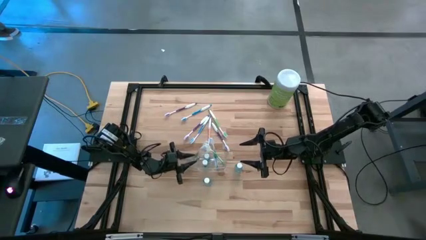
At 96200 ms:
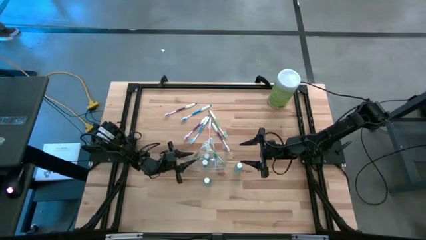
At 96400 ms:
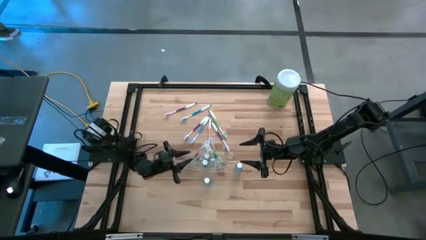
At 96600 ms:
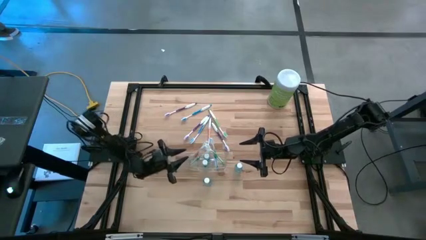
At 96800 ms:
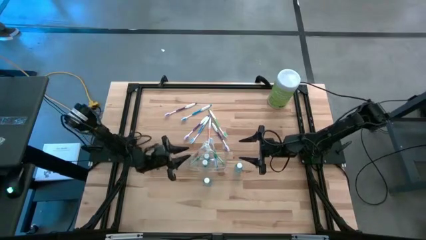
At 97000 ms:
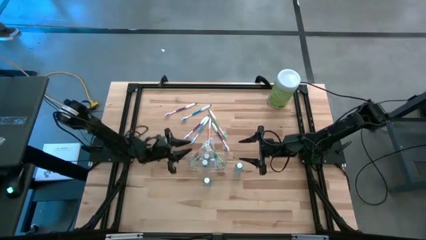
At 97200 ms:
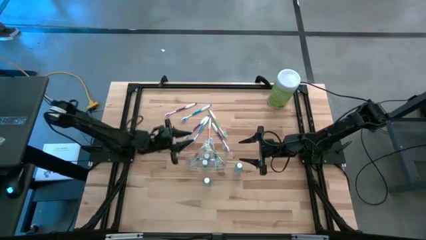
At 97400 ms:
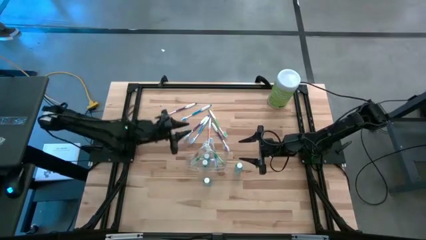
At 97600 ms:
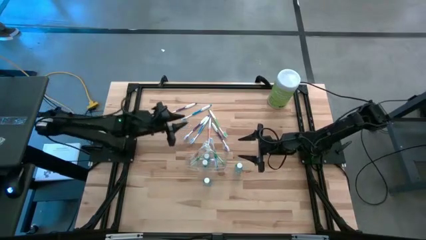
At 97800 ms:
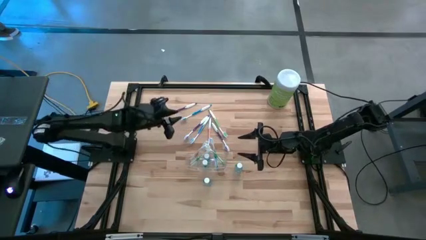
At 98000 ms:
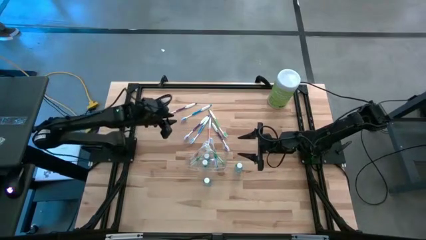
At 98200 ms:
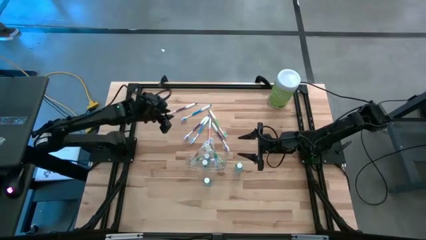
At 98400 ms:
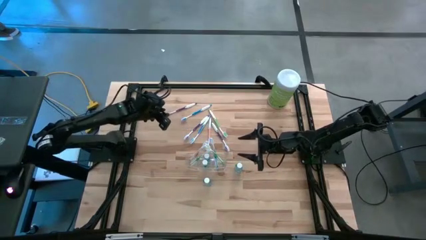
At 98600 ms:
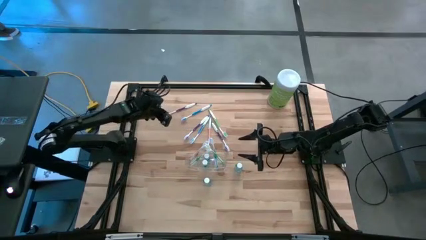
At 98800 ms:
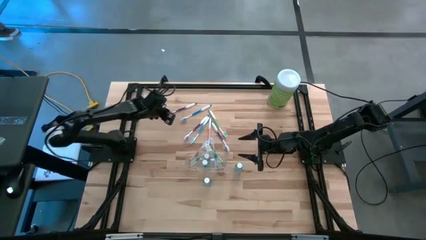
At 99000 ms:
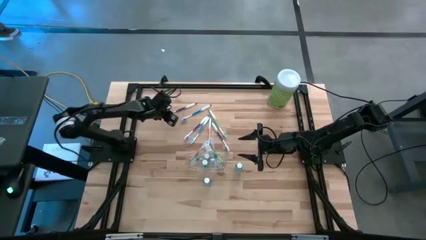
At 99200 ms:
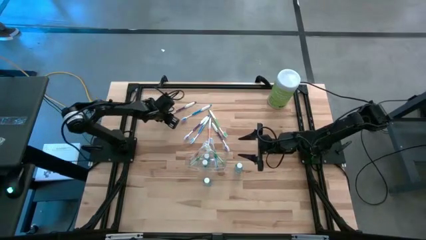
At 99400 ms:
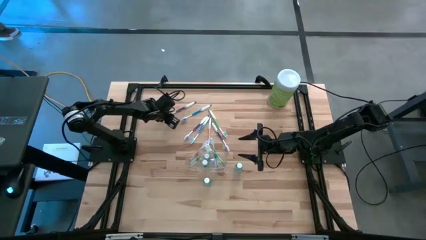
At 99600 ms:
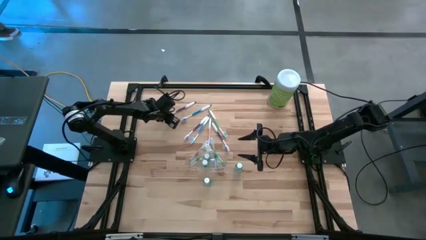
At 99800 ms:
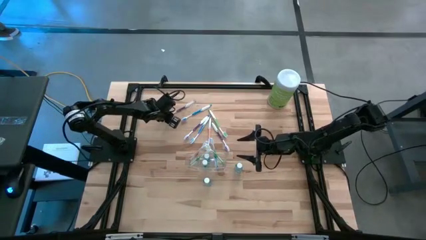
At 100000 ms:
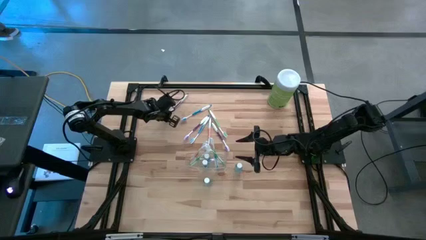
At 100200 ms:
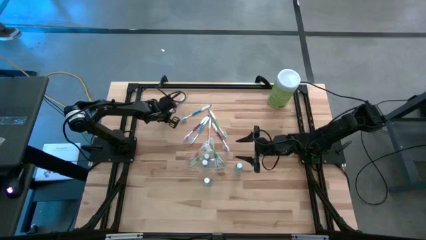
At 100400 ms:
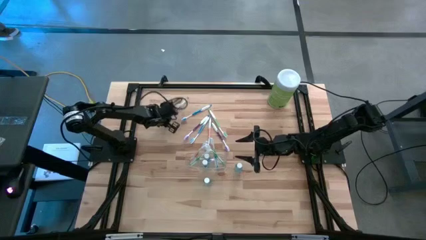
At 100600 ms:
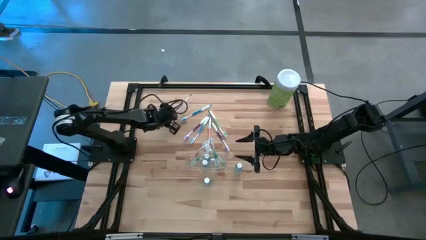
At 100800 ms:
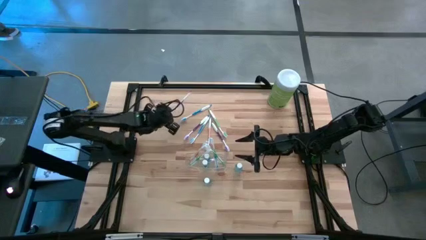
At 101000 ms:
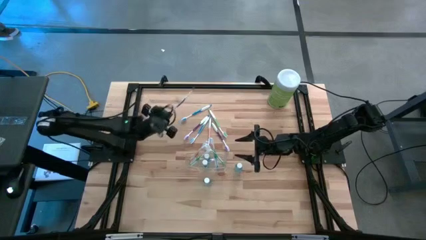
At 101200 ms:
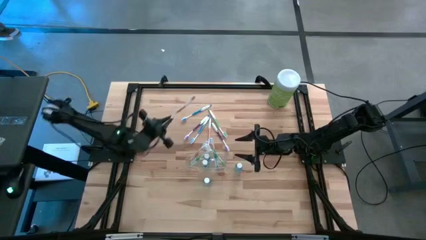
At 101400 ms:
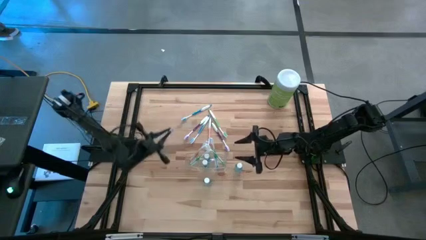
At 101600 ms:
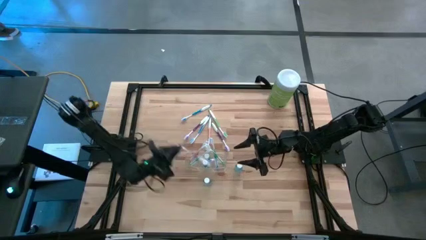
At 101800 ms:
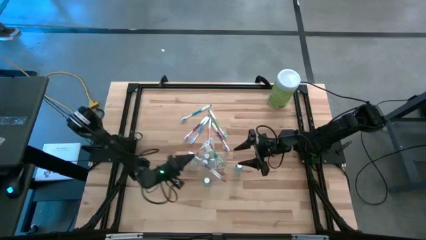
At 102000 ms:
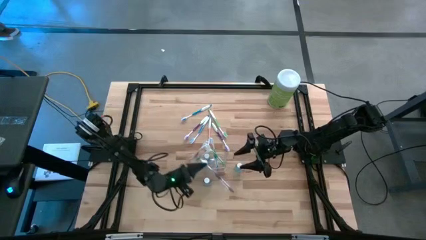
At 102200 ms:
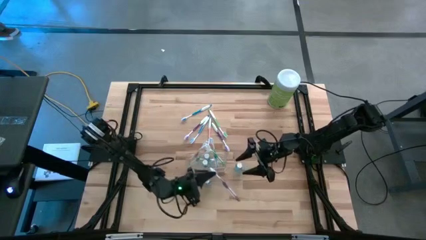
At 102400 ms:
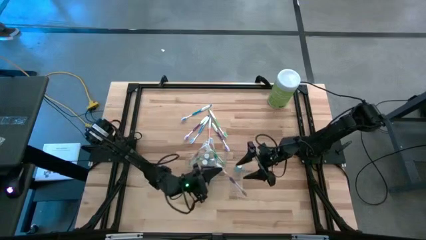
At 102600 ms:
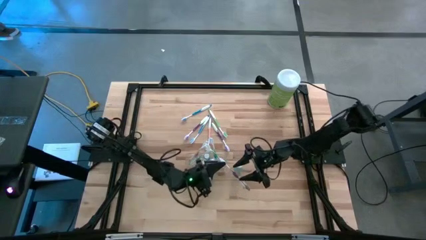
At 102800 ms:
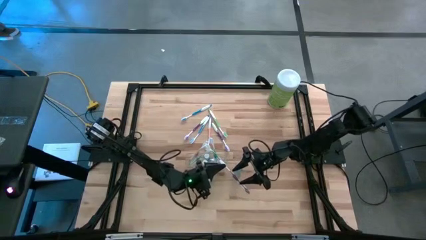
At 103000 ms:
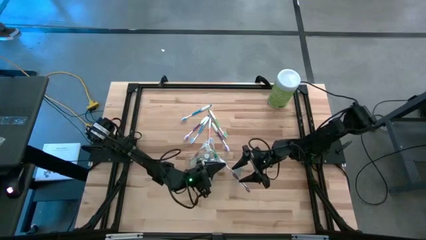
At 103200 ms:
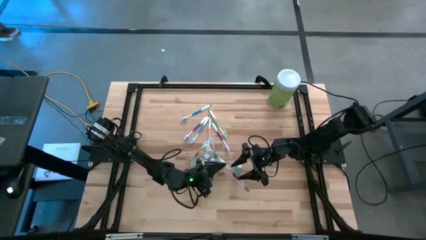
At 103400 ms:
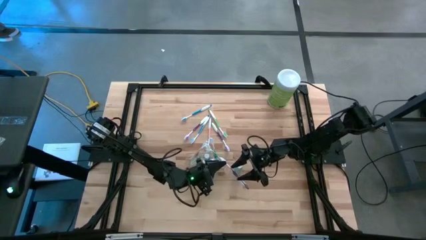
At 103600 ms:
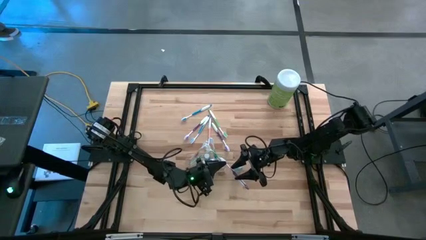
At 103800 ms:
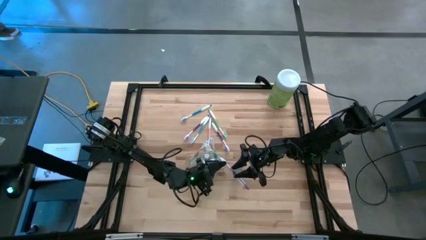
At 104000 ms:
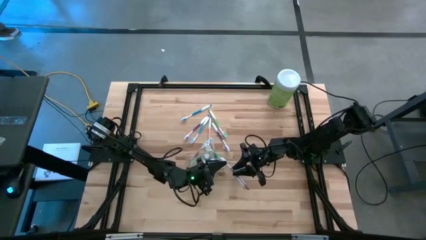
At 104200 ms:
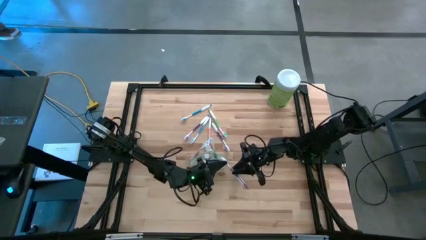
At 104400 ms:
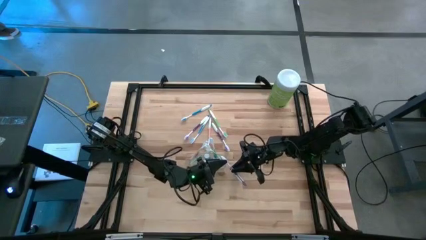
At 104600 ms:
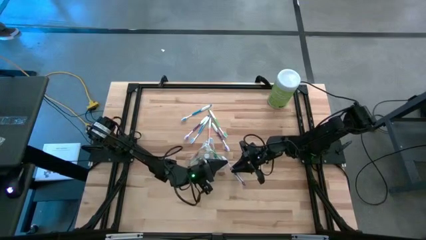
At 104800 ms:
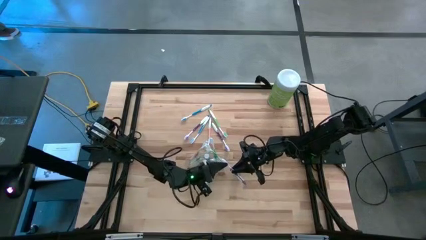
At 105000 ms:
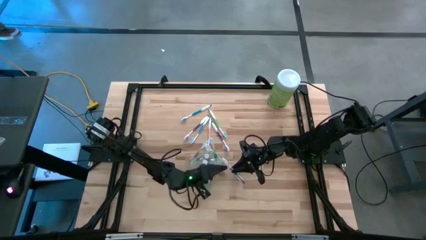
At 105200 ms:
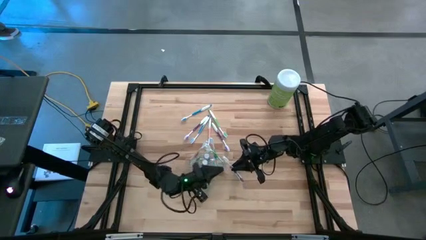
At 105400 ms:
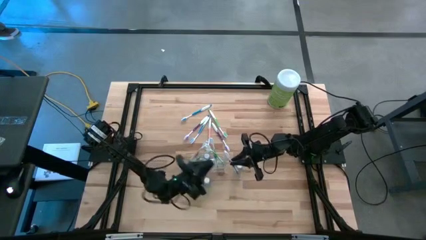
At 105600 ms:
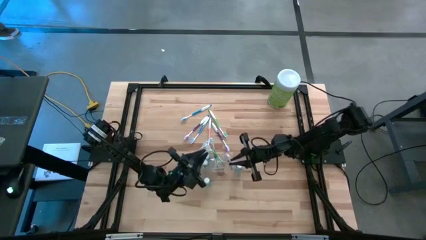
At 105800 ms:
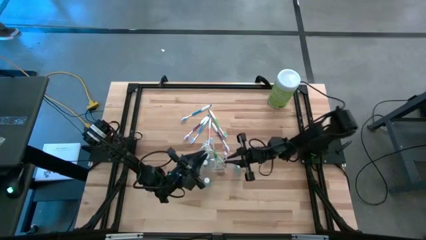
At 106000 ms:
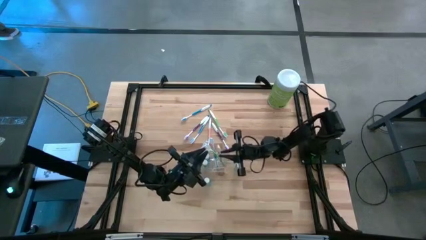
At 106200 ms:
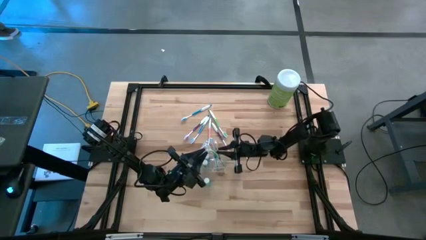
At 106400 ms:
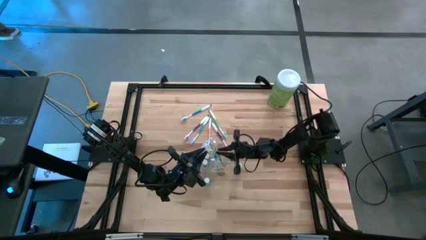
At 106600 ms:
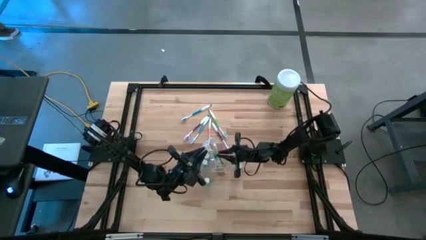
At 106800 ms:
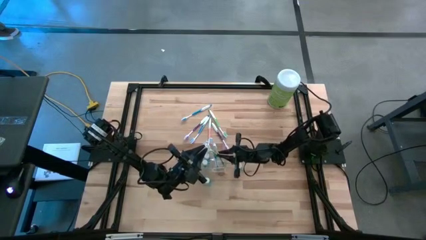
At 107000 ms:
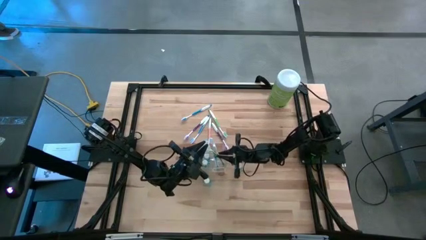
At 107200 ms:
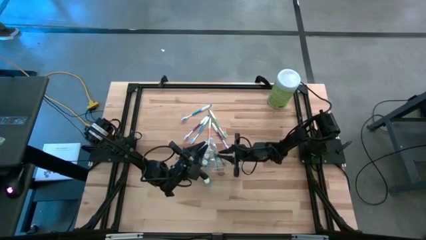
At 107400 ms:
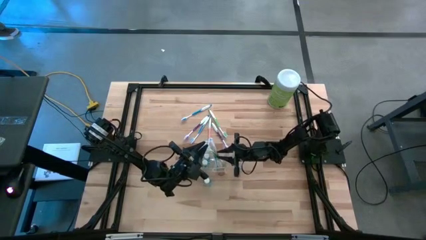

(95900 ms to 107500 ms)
Task: Pick & Place toothbrushing station
Put the violet toothbrush into the transparent organizer

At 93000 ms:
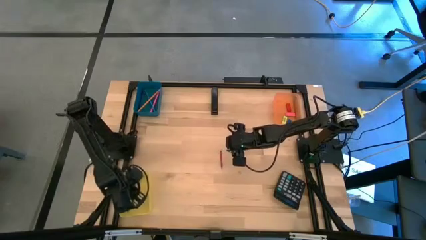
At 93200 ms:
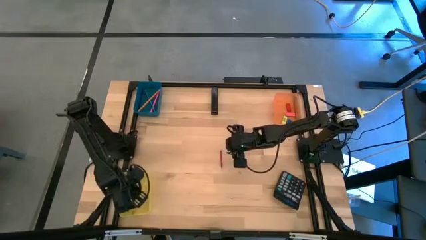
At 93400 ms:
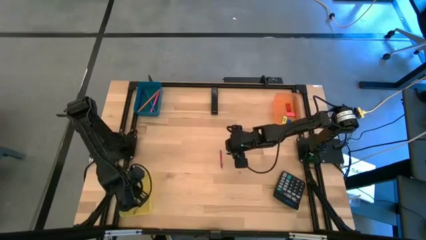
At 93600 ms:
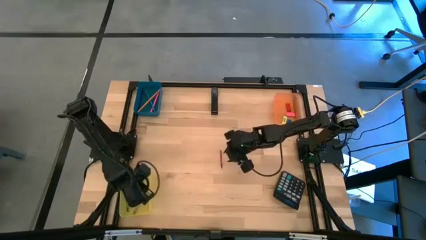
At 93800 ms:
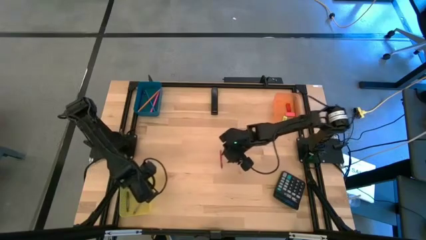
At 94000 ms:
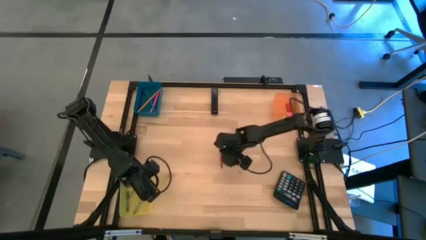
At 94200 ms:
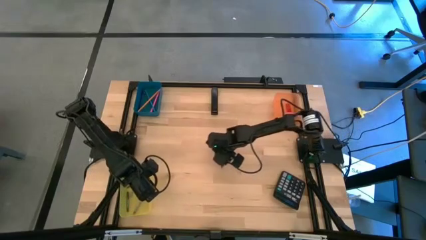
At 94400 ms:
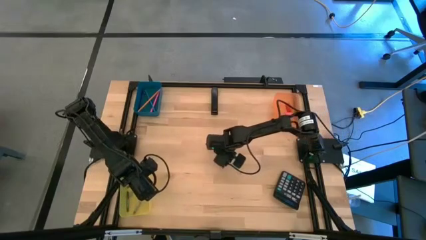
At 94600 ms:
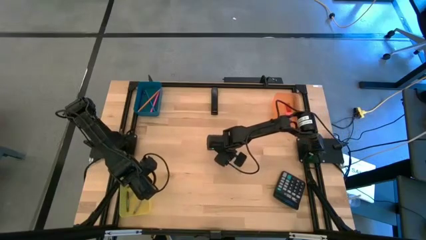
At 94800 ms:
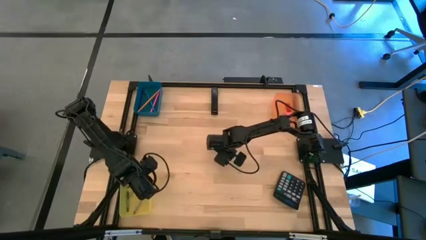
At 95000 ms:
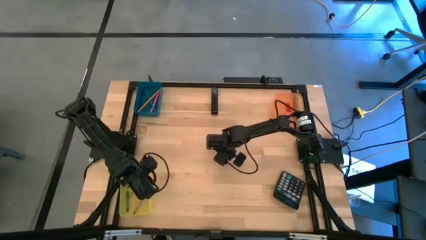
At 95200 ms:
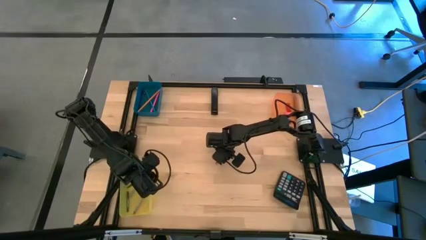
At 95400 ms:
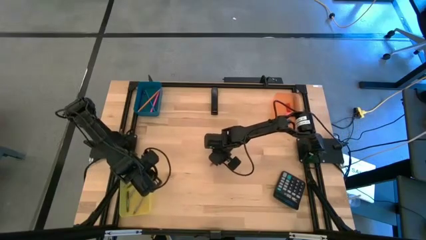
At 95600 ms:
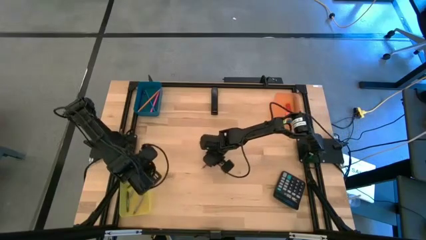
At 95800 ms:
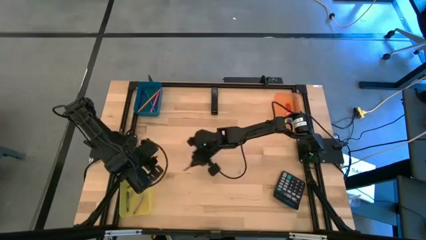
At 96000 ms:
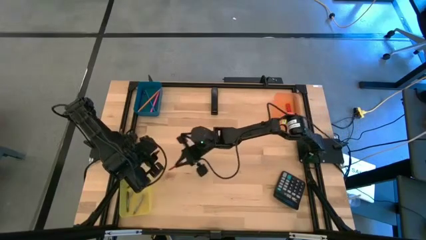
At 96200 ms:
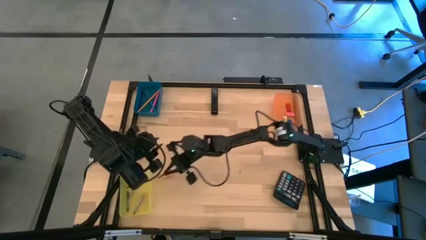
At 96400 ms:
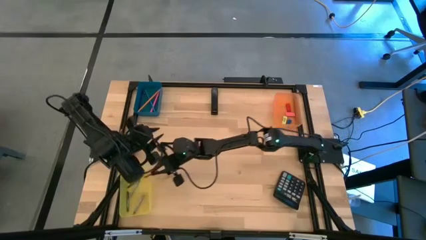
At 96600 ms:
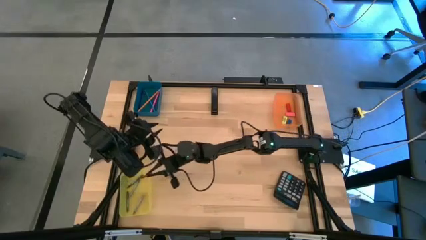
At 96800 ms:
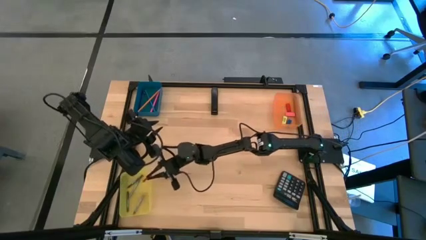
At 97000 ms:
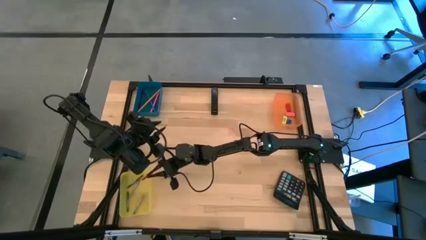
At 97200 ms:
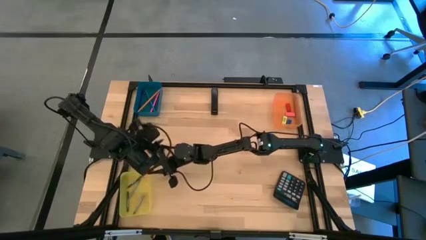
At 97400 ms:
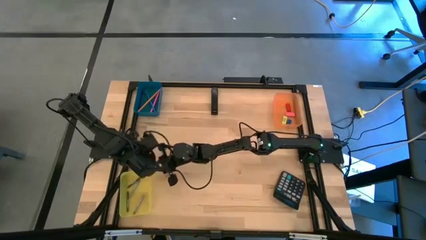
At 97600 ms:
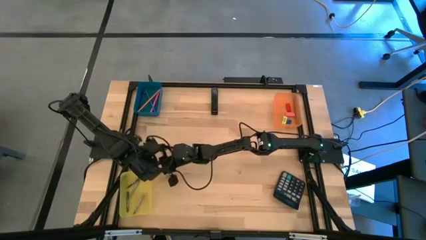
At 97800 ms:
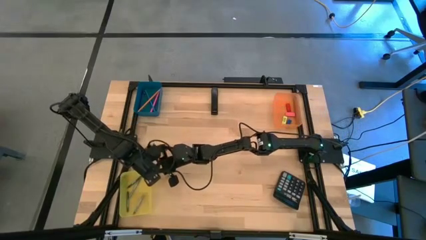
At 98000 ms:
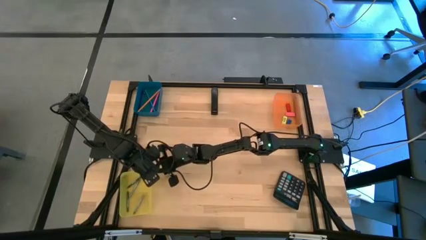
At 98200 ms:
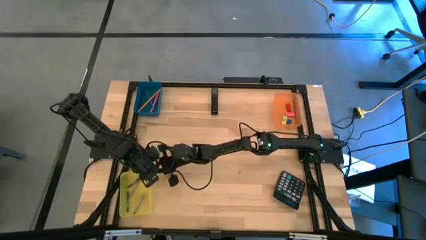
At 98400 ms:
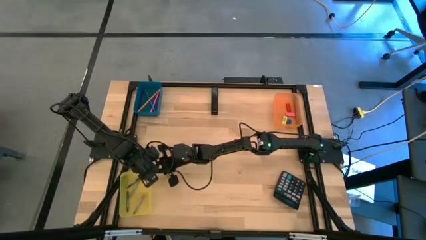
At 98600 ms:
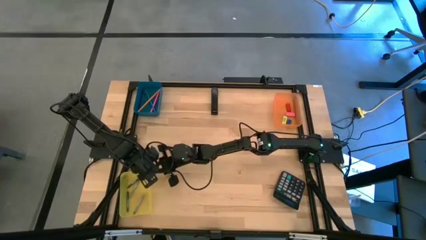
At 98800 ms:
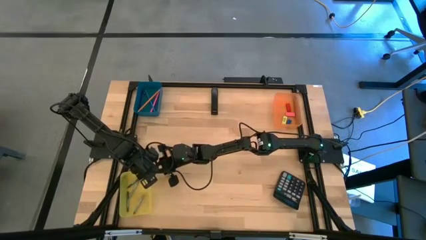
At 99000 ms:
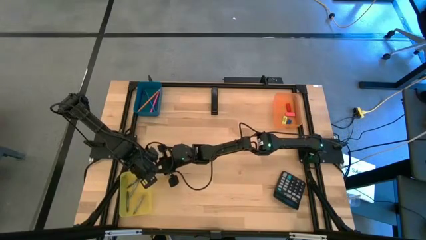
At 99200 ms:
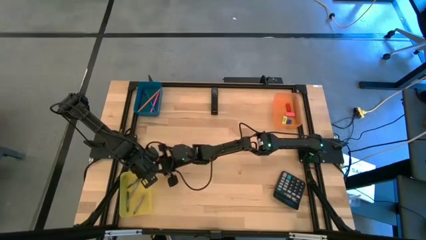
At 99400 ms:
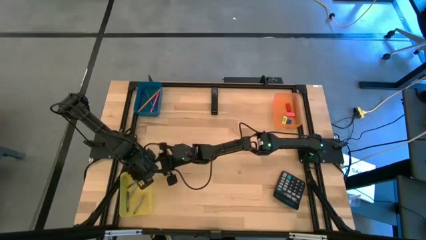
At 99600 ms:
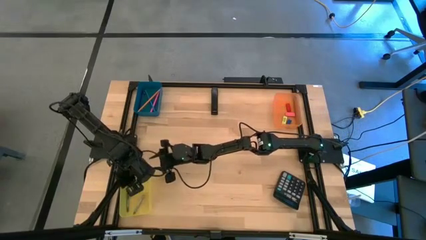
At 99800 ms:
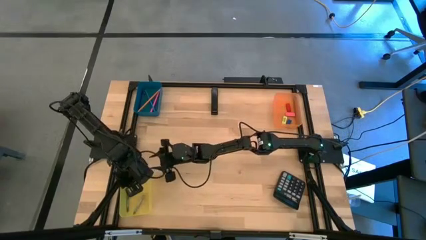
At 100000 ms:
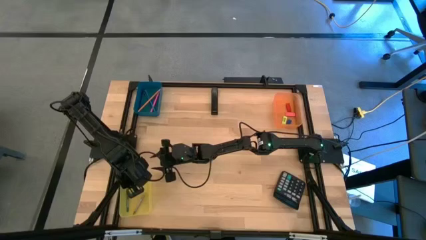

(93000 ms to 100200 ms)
Task: Sort crayons/erasers/pens/pencils in bins
Put the red crayon into the yellow bin
